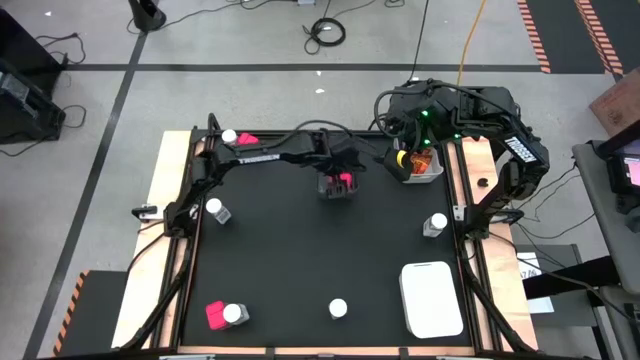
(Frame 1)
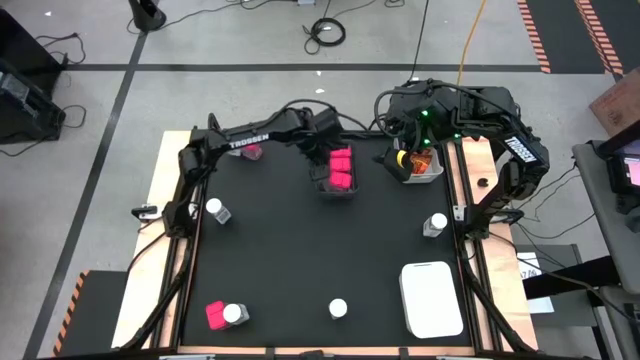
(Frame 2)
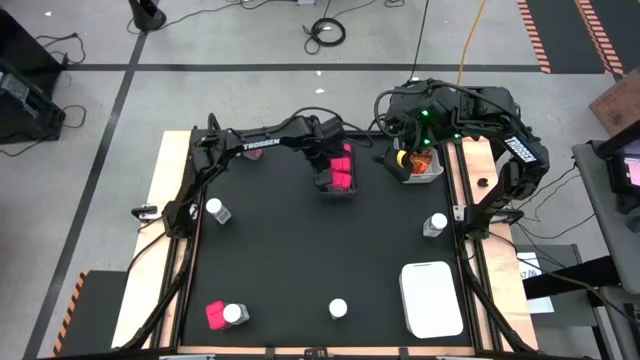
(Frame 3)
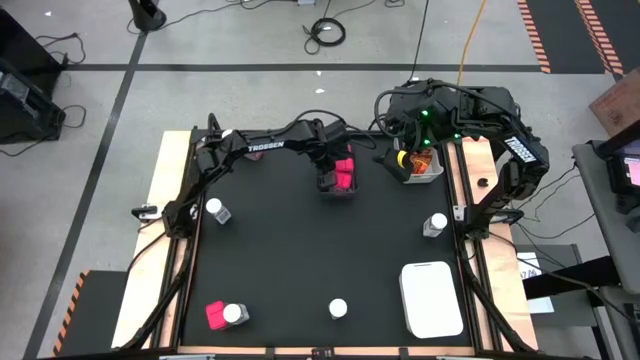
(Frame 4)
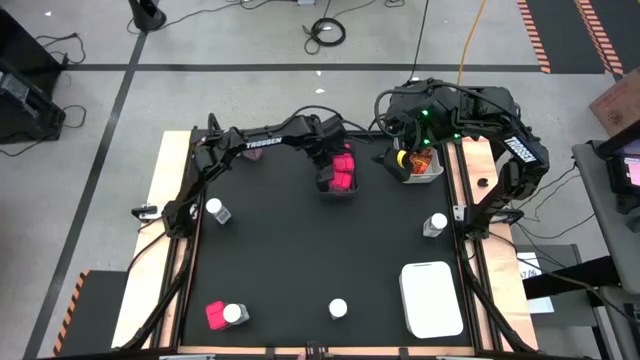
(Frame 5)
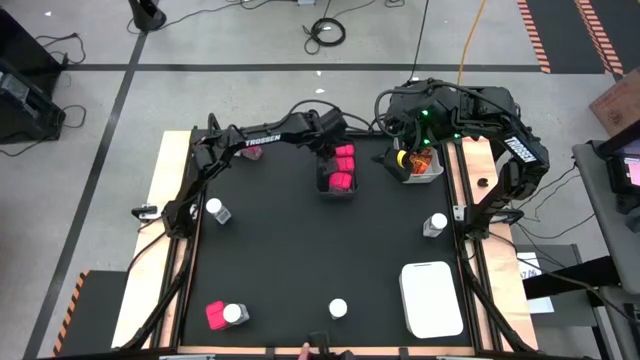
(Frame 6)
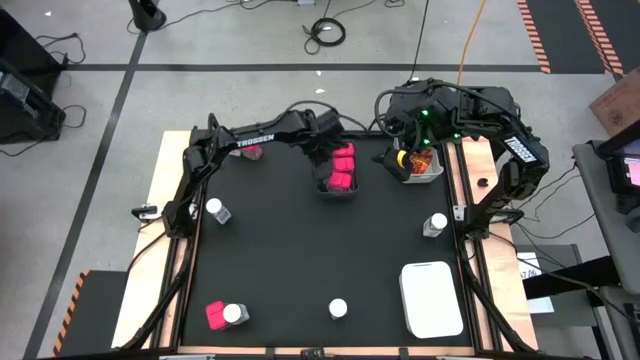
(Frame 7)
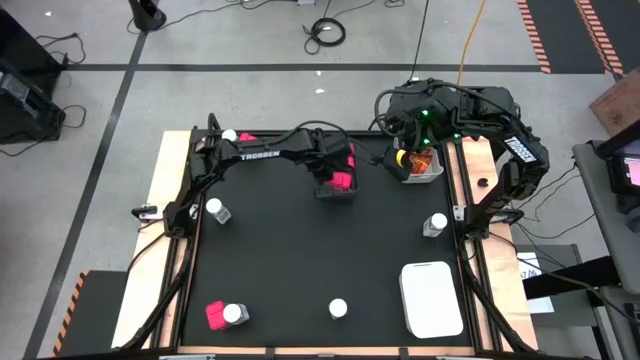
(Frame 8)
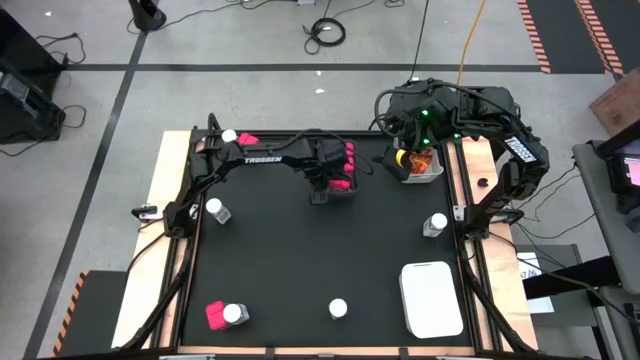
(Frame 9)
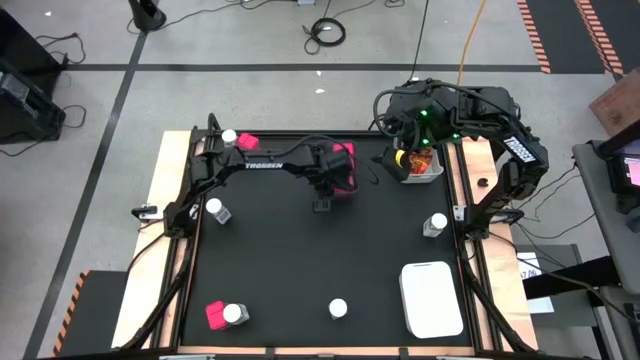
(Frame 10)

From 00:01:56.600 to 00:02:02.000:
Task: Sort spices by type
Adjust the red seasoning cans in the black transparent bin

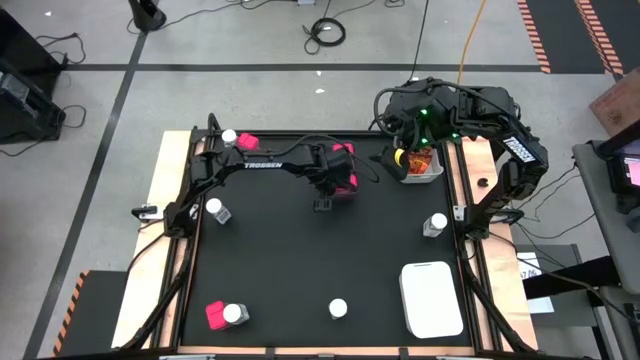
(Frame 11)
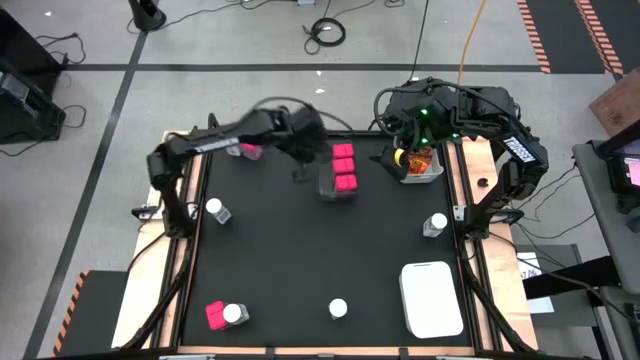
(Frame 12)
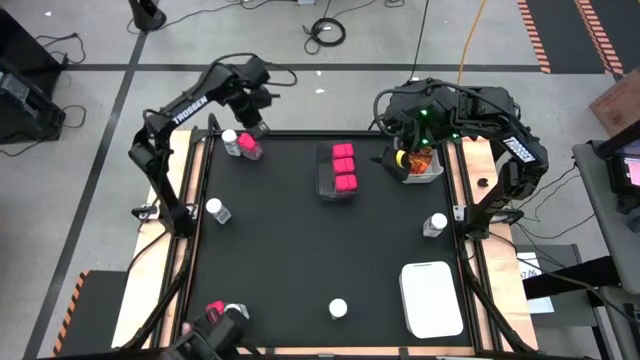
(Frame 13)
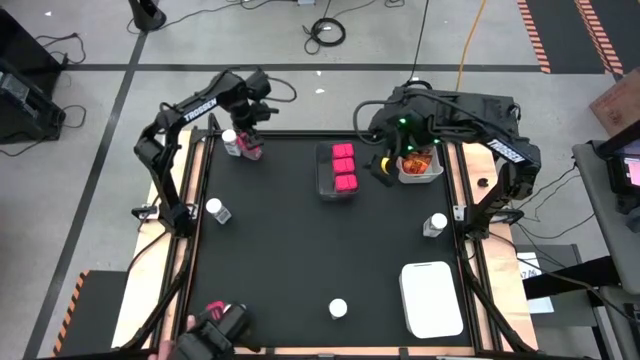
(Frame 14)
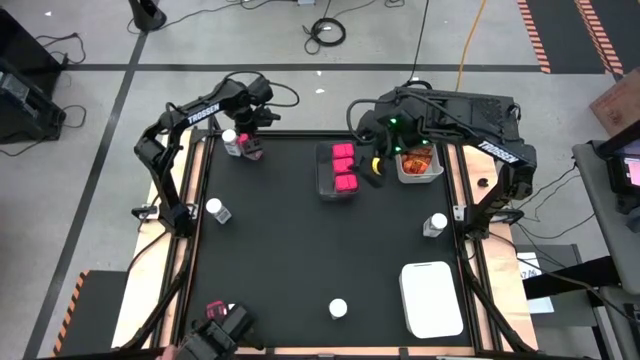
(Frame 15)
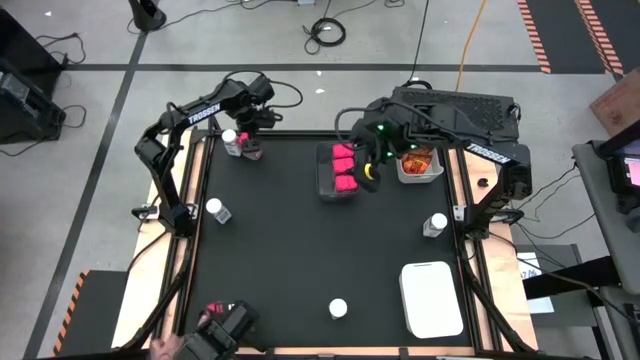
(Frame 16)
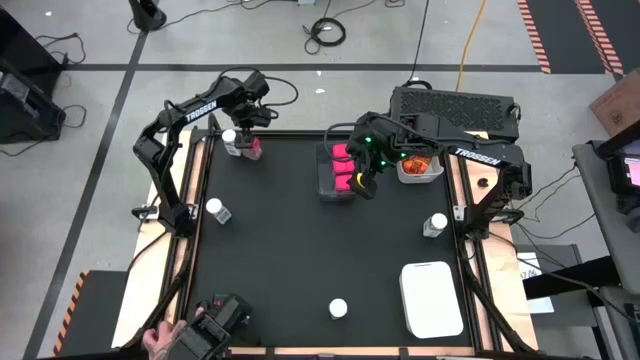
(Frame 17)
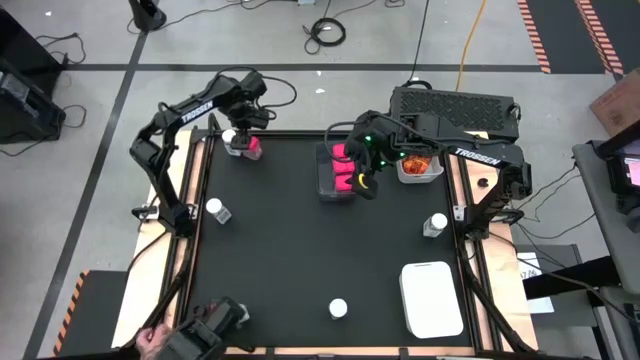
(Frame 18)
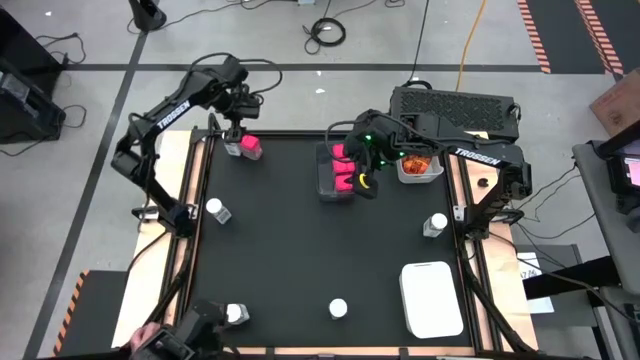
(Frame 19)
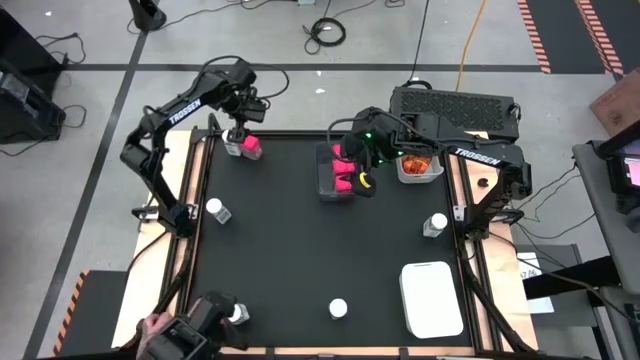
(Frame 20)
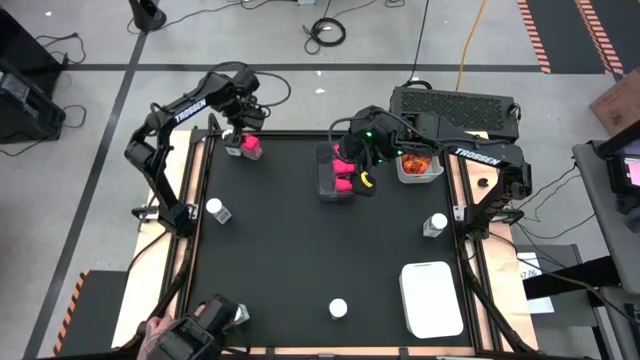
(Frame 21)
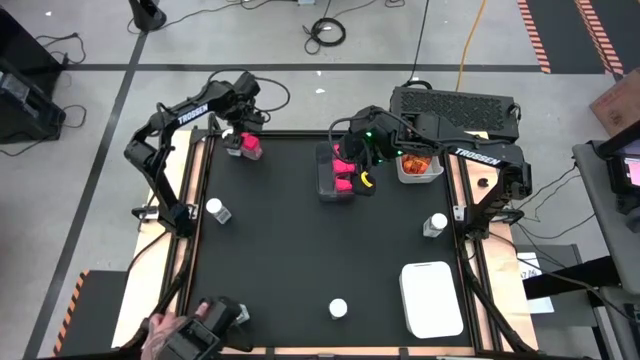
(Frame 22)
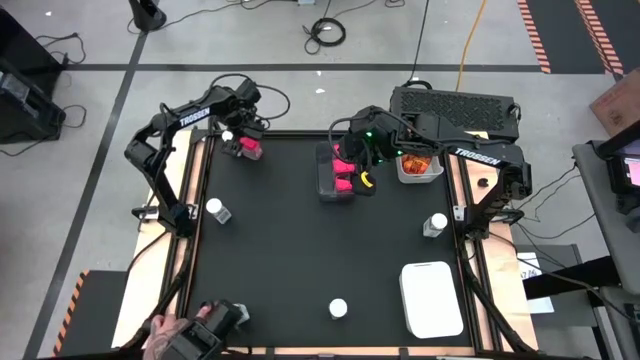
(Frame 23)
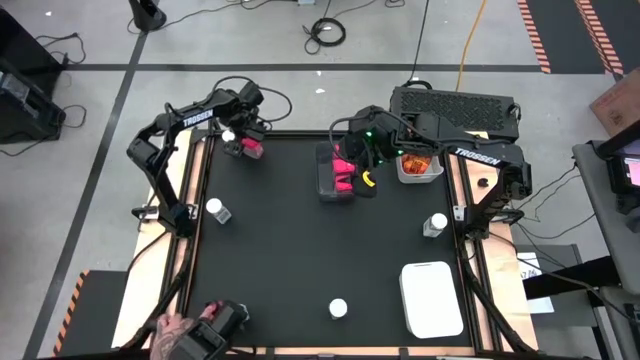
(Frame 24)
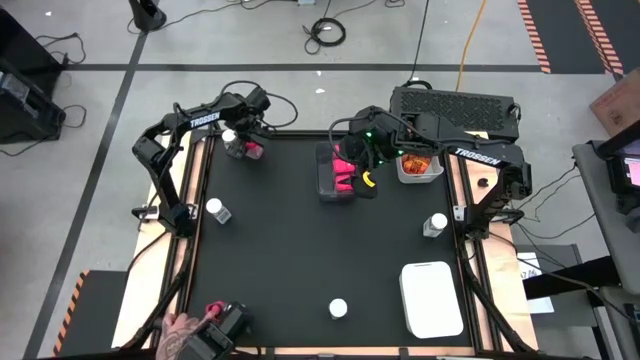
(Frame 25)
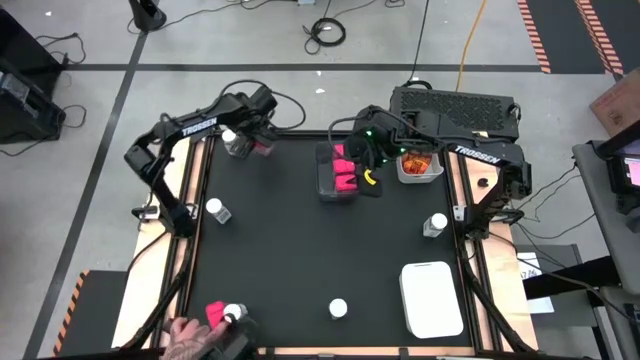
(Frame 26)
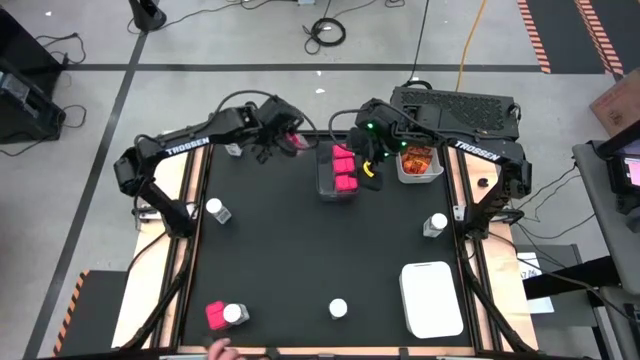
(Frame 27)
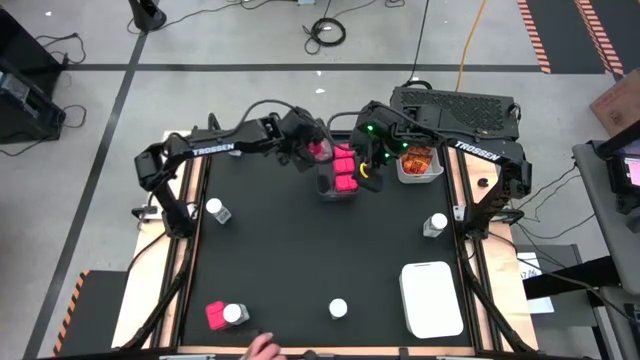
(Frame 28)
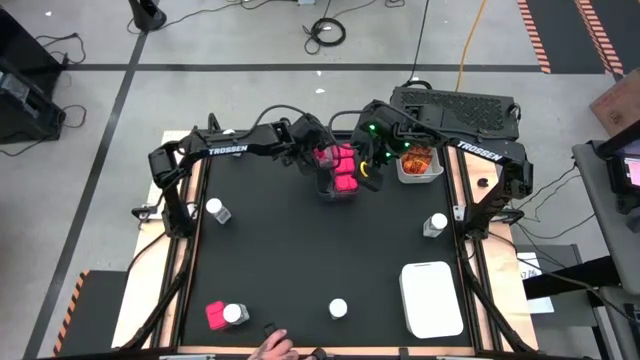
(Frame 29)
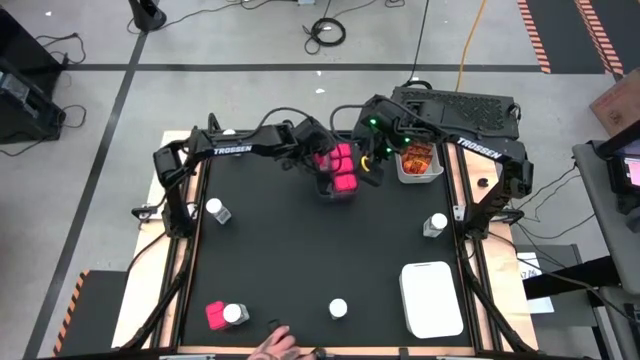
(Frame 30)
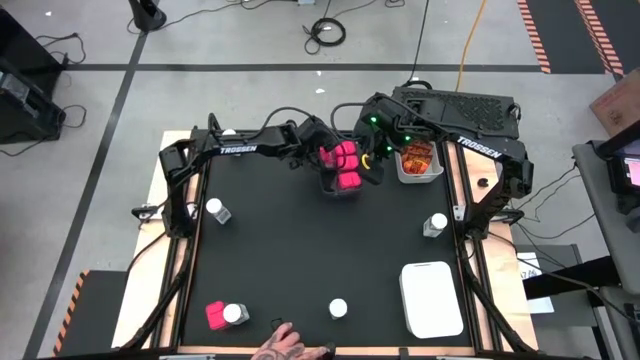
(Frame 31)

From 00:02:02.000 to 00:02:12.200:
Put the red seasoning can into the black transparent bin

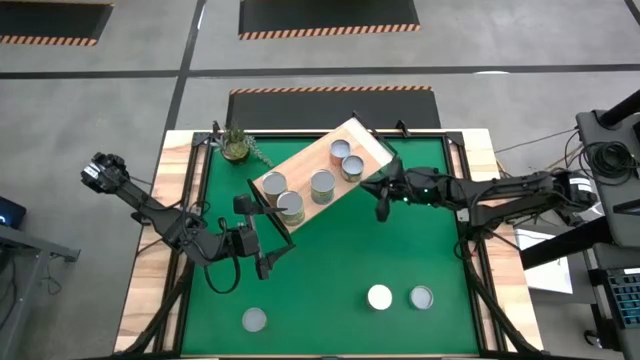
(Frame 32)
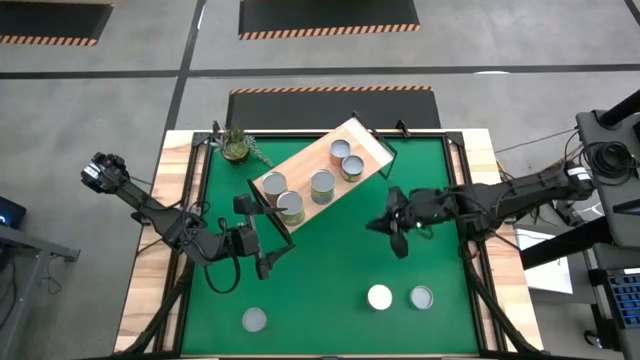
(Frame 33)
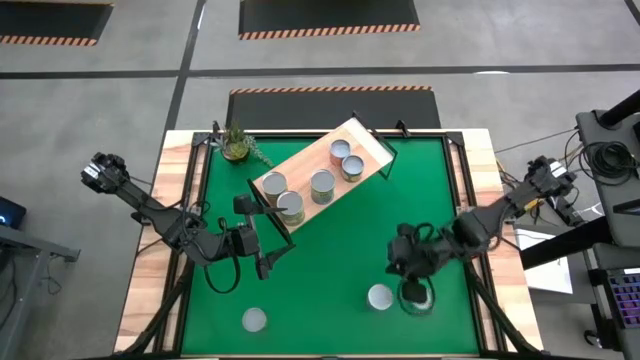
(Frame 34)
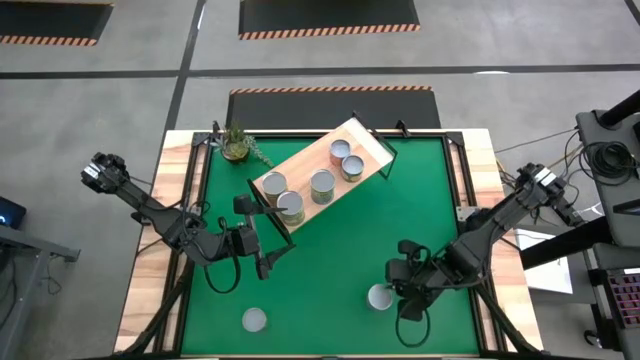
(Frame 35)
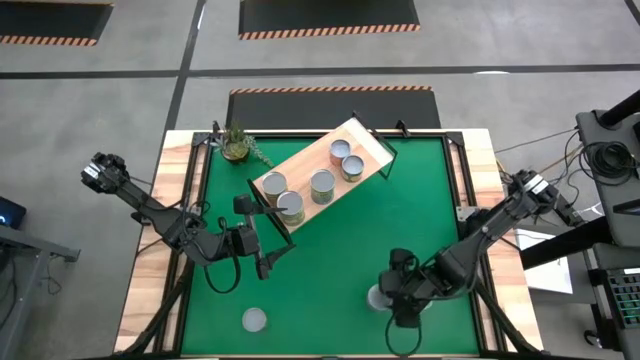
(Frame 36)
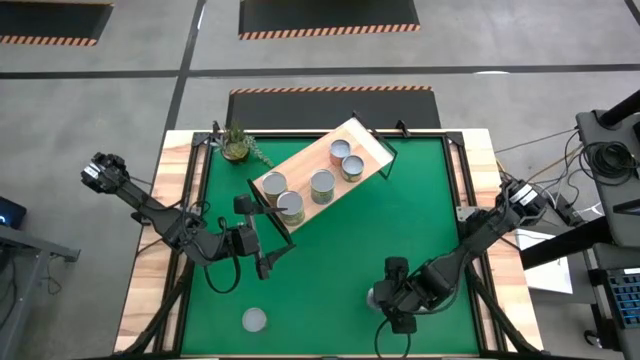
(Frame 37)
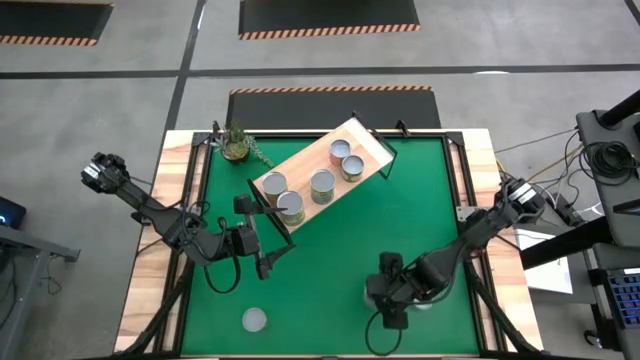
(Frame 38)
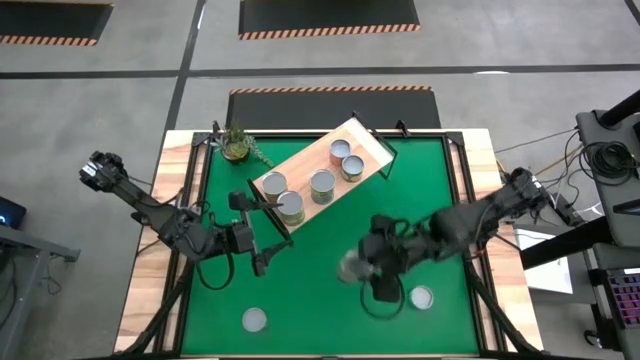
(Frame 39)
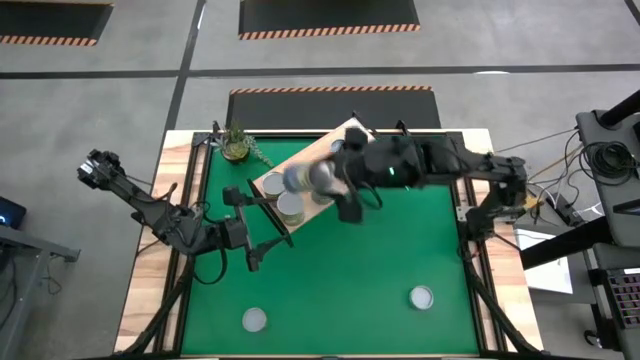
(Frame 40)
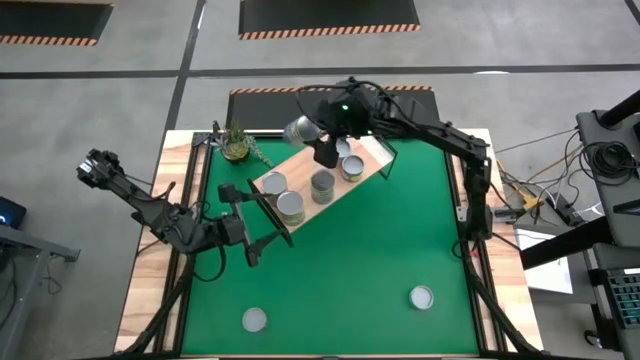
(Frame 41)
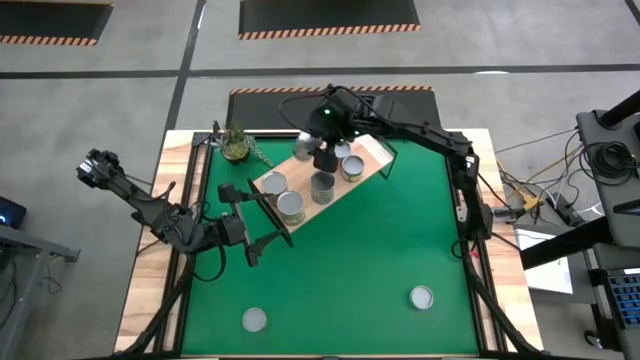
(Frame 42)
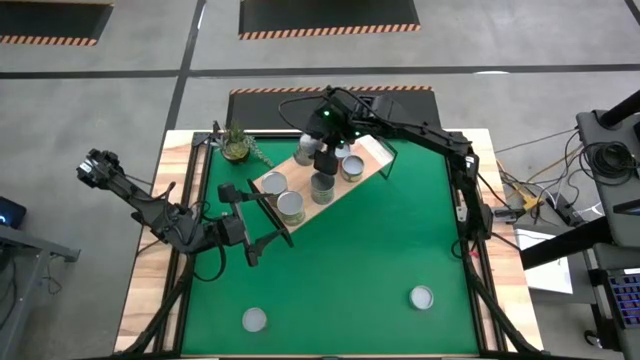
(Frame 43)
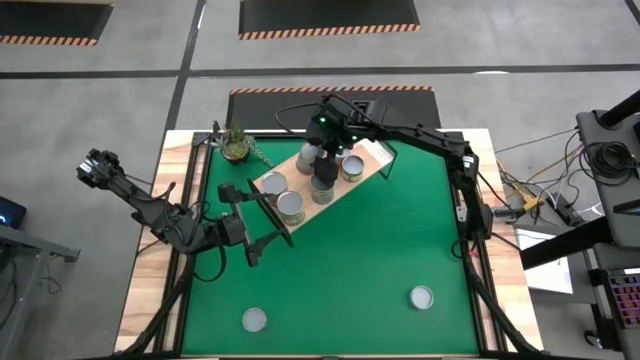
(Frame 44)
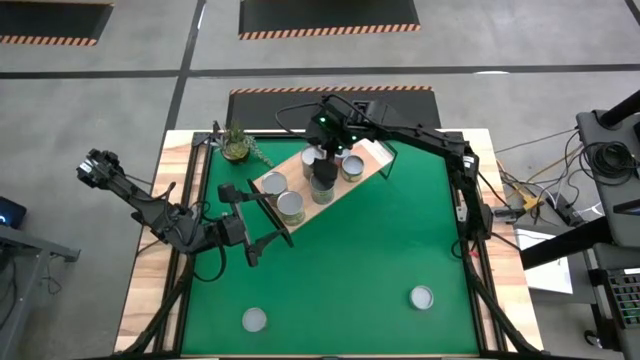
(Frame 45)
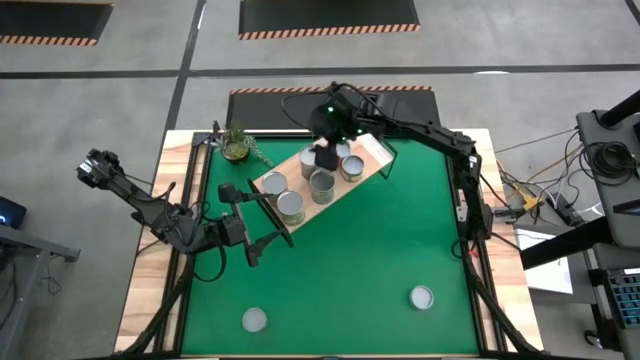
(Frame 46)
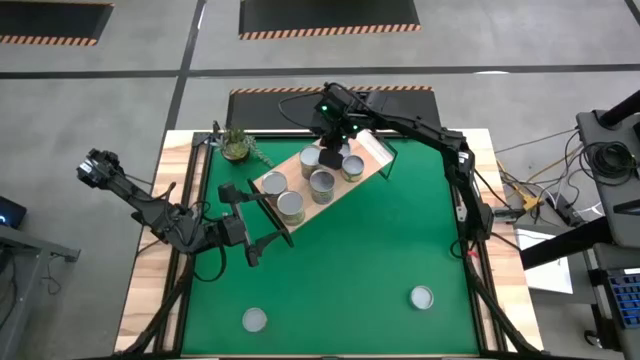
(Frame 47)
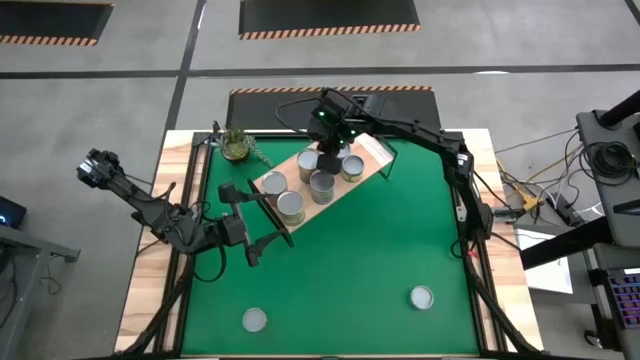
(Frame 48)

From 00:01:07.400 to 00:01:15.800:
Task: Pick and place cans onto a shelf
Put the dark blue can on the shelf
